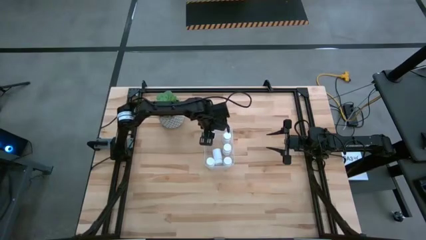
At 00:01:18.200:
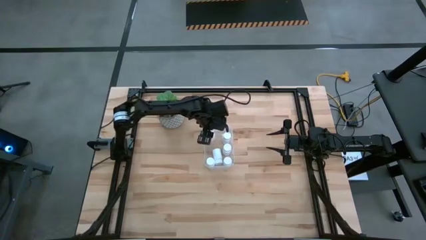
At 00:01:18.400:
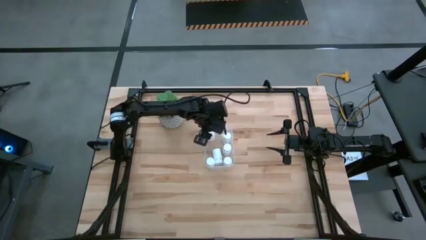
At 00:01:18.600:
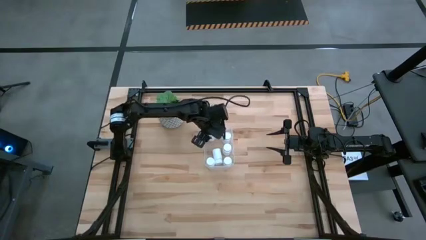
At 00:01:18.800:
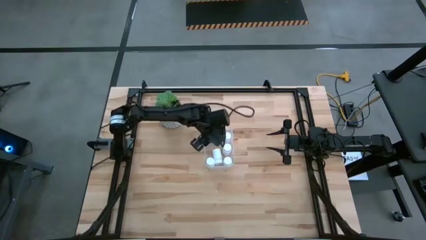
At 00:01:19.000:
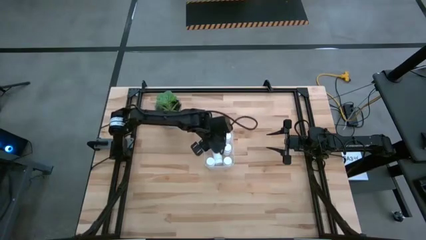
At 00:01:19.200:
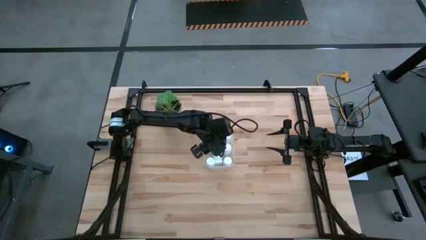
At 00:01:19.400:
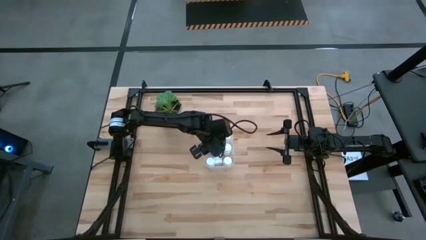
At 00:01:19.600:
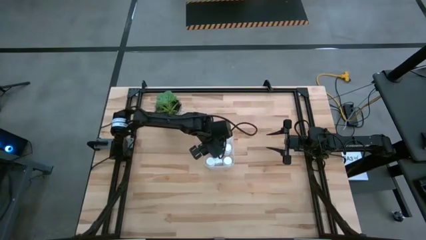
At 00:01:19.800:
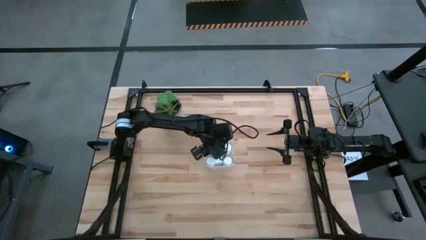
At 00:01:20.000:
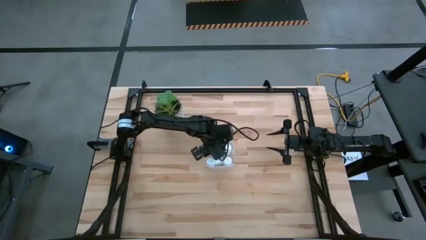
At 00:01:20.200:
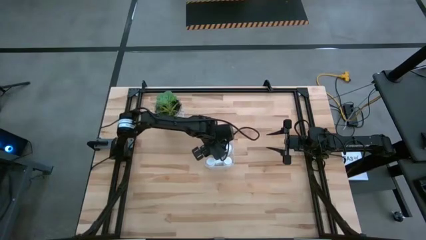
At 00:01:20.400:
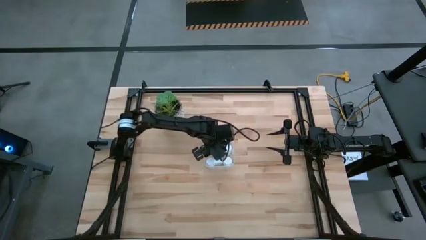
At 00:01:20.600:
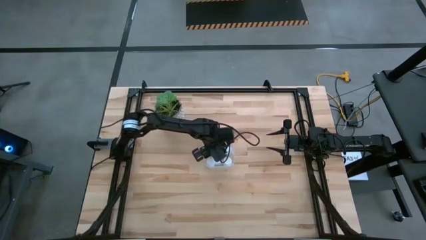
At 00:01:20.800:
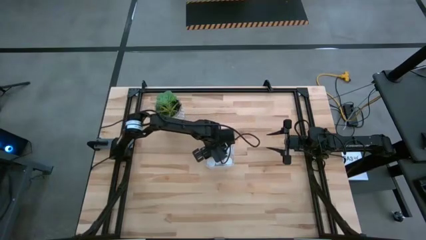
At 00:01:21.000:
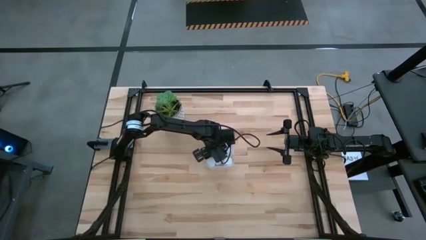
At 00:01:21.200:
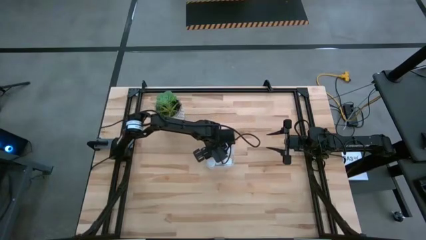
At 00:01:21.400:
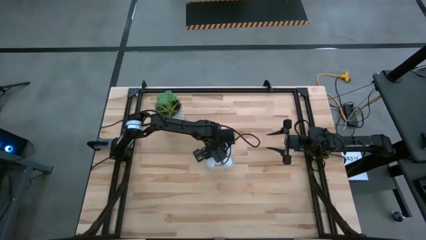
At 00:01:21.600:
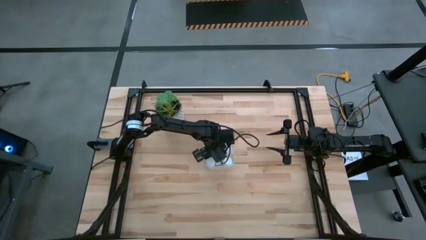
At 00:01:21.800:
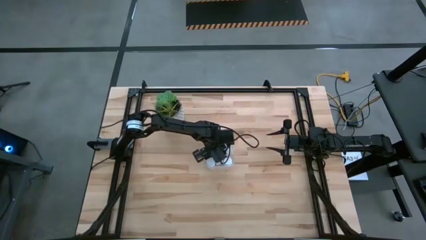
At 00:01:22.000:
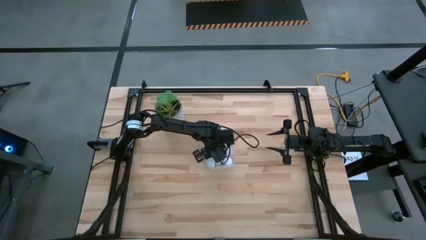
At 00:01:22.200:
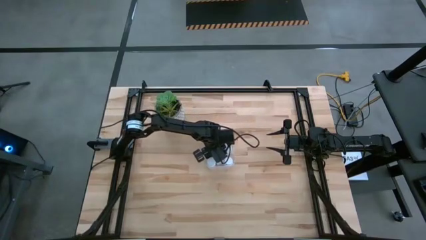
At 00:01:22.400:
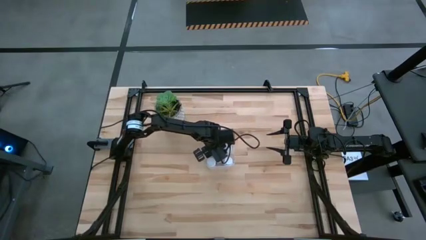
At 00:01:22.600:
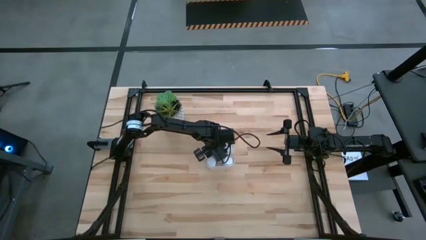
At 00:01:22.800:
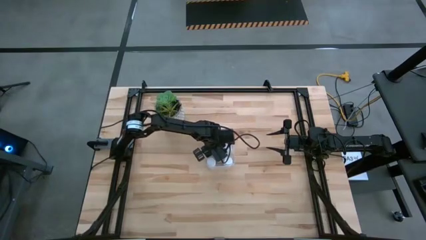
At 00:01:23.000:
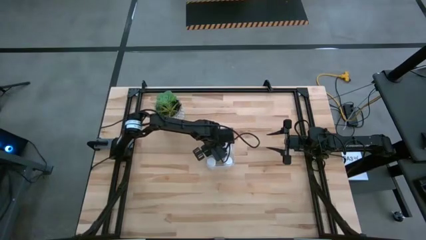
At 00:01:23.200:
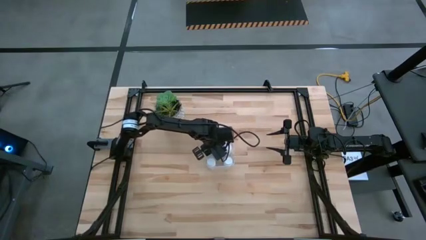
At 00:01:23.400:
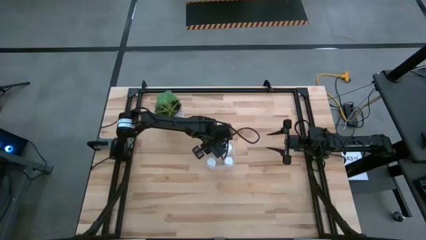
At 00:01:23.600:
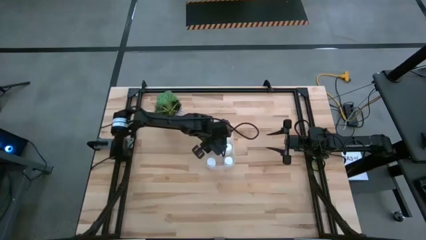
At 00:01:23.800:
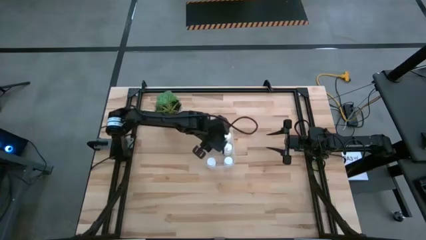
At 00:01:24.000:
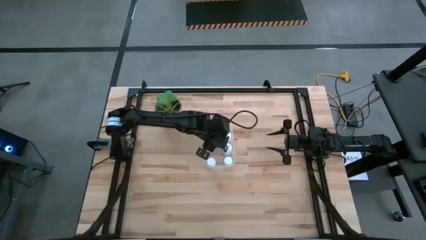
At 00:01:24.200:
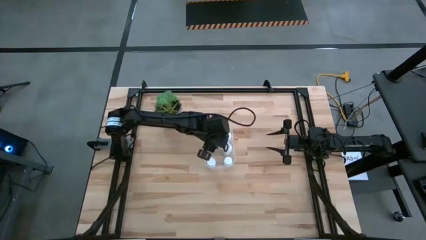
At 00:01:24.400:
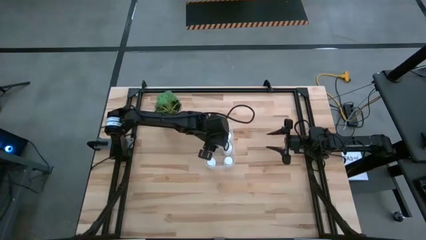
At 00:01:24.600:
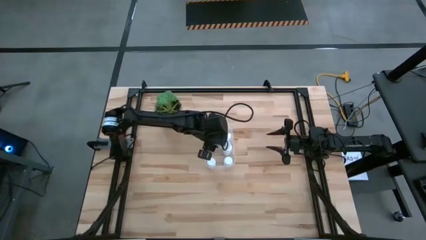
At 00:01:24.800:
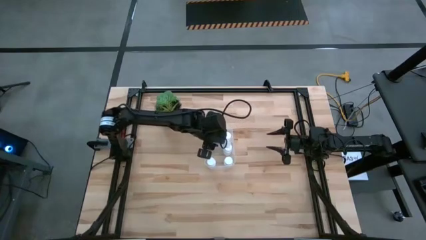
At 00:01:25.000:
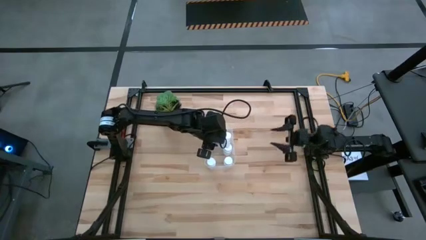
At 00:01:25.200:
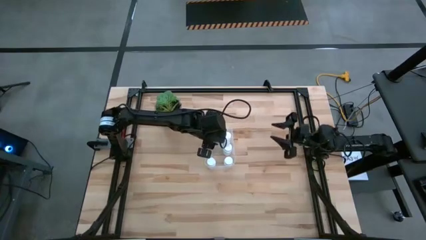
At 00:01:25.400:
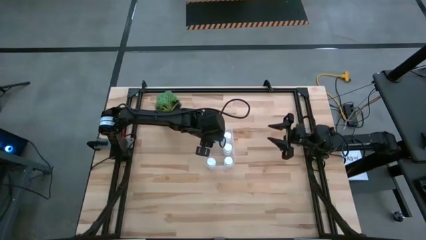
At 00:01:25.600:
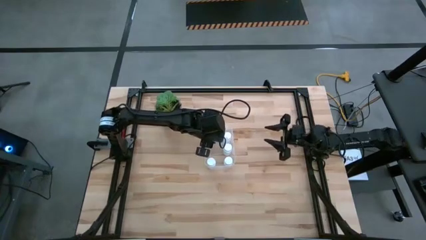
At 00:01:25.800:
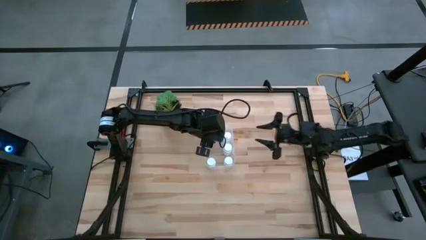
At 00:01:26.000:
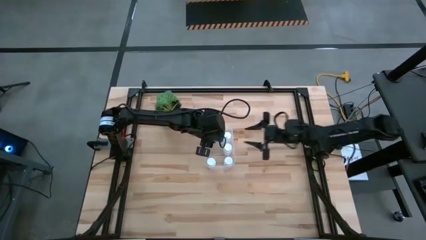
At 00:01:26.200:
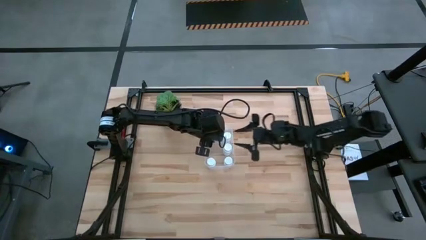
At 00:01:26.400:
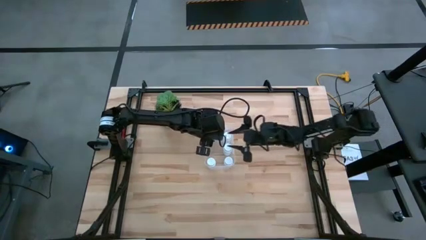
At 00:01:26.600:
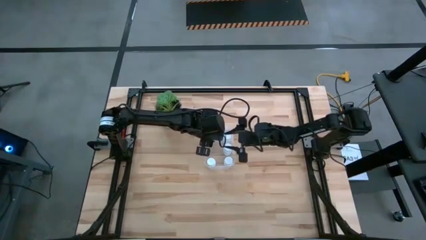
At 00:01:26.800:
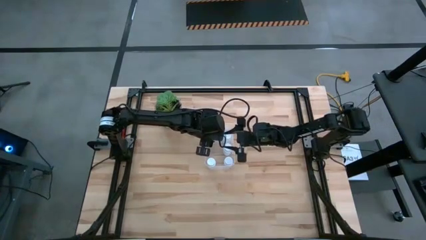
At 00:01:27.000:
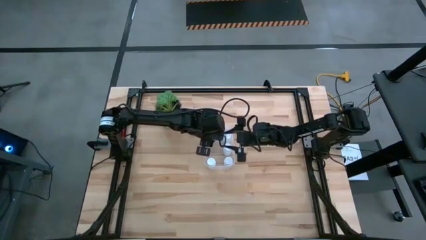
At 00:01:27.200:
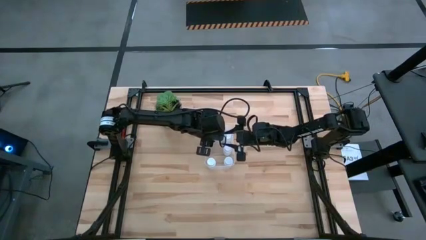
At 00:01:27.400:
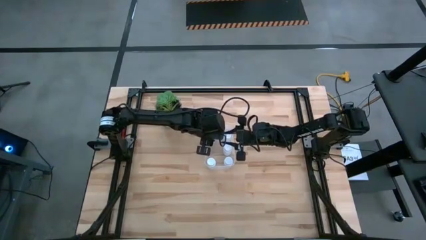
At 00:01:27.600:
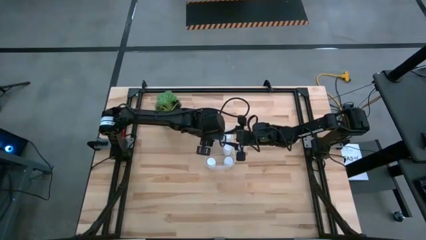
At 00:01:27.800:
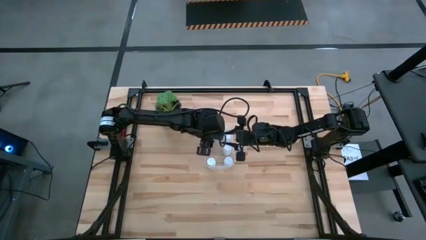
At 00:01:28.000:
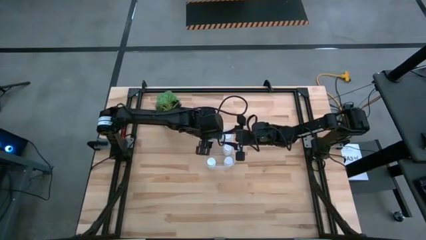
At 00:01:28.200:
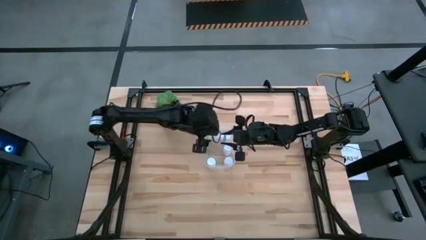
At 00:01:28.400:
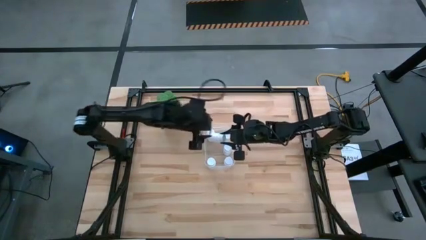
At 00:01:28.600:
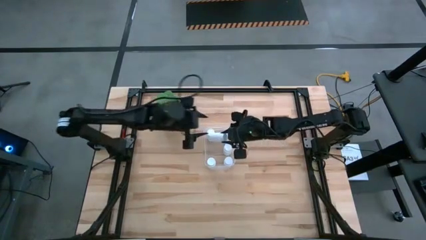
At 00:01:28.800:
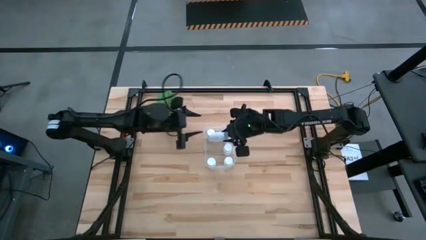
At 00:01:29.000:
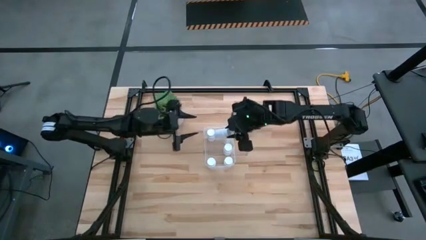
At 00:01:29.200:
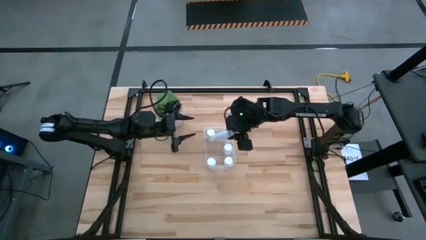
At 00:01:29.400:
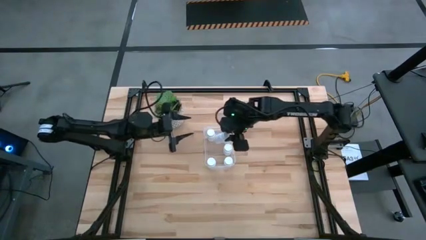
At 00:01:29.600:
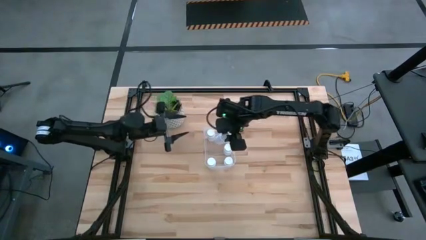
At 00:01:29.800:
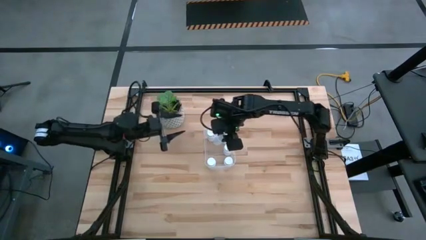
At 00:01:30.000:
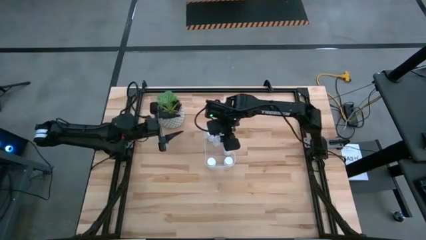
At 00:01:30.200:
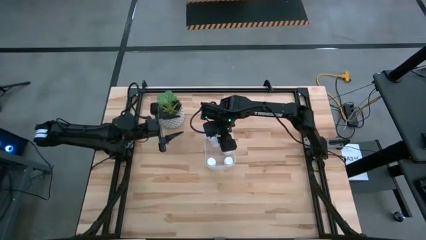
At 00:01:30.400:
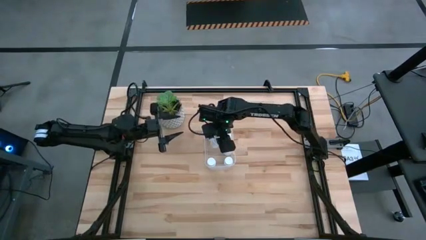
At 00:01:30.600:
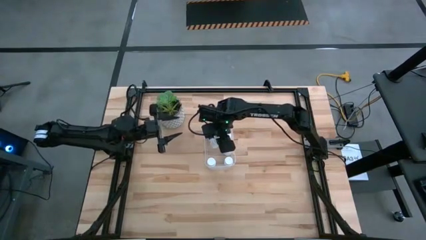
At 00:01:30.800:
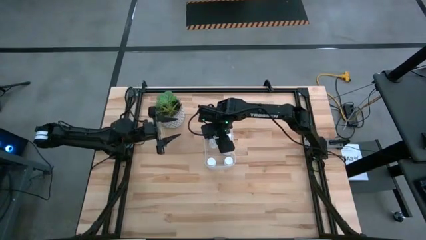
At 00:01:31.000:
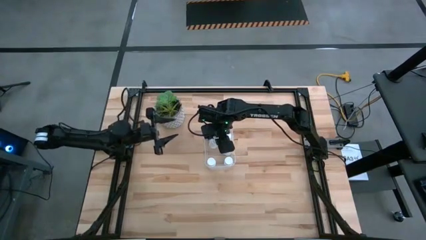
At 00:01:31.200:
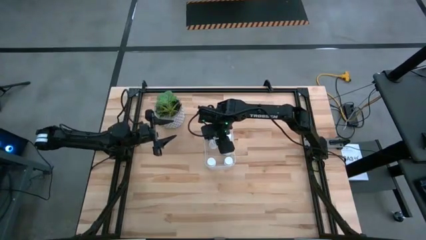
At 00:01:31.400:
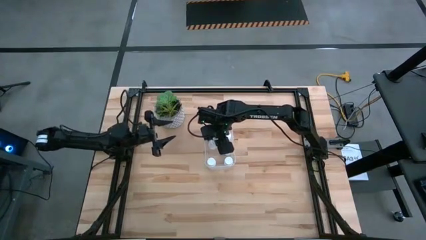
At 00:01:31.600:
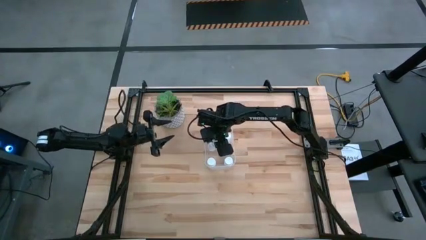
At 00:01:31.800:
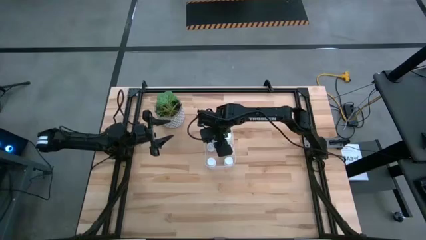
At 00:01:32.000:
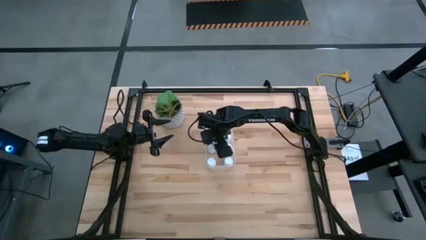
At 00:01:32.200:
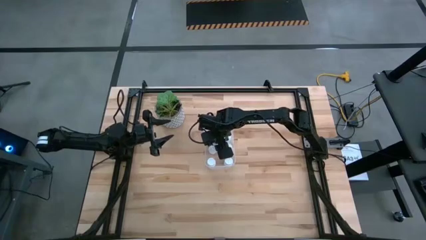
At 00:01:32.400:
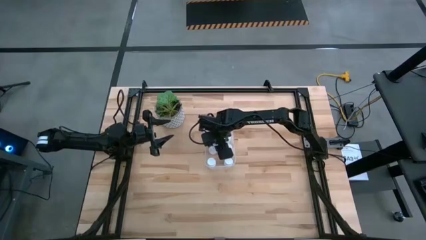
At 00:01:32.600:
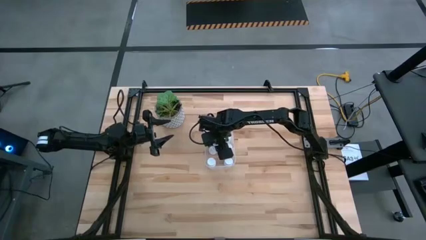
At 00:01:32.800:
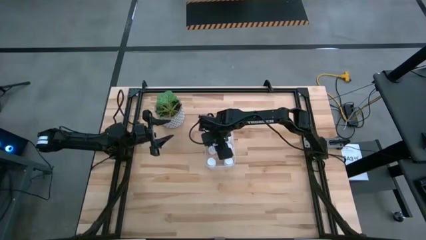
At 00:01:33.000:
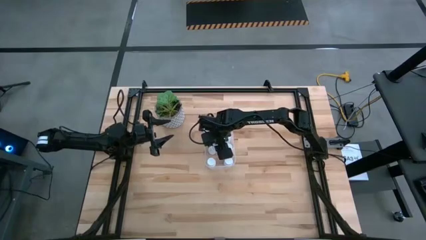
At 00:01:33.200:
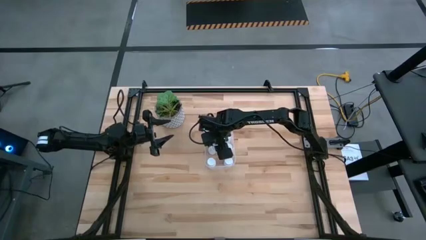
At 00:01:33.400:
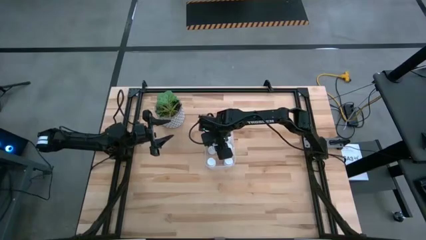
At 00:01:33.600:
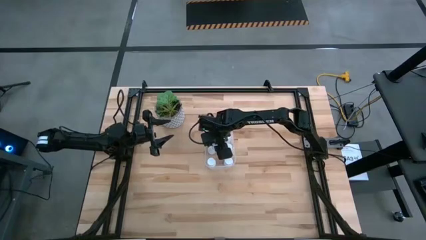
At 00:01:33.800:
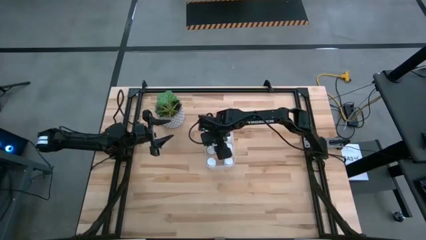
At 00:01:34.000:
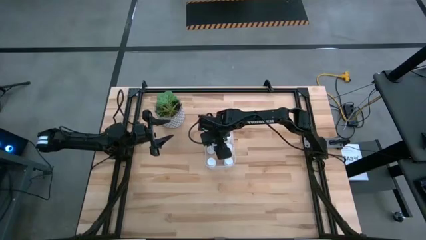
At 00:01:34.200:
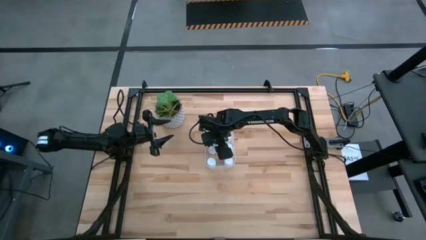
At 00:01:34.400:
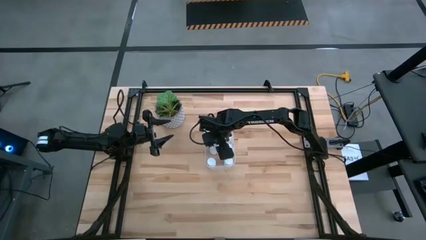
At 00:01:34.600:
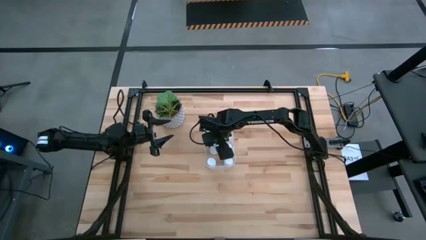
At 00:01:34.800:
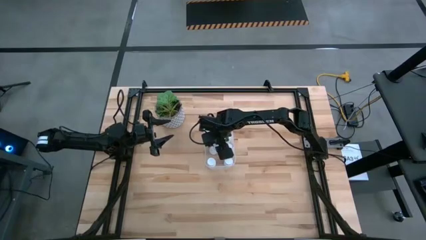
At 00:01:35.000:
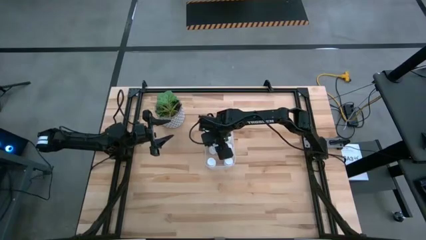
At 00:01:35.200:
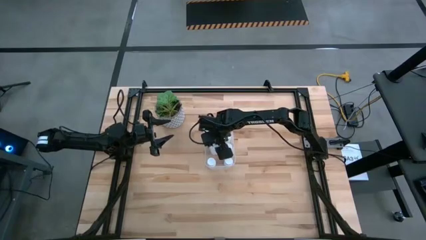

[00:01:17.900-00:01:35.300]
Task: Pick and place pill bottles into a basket
Adjust the white pill bottle
